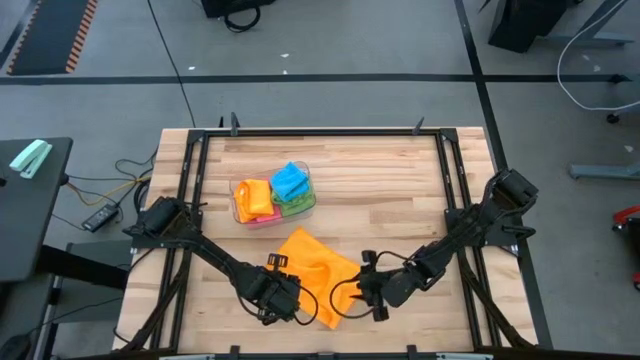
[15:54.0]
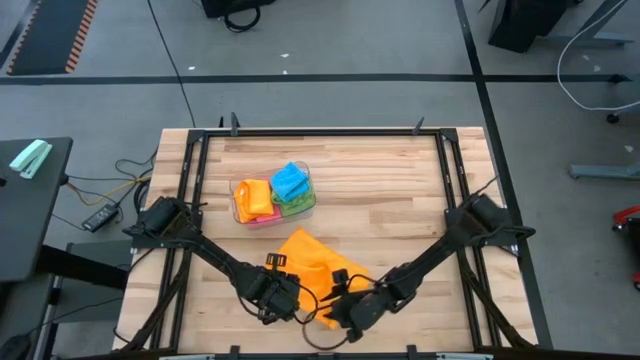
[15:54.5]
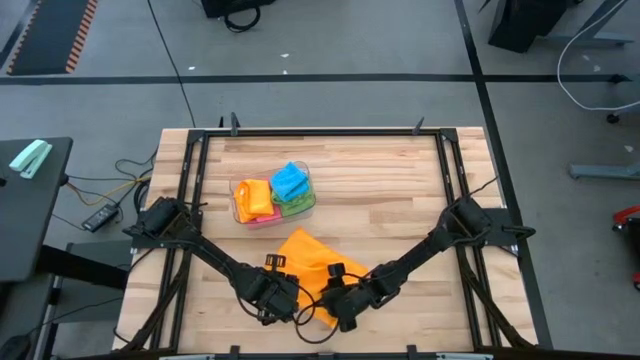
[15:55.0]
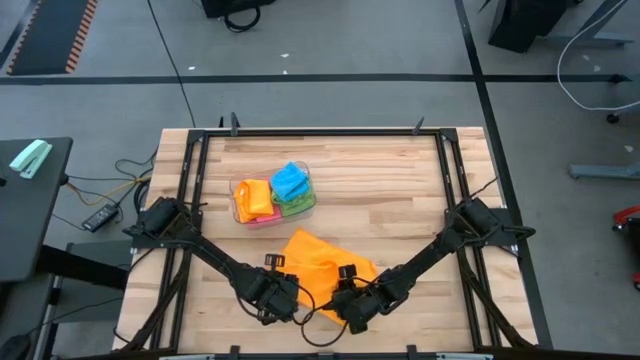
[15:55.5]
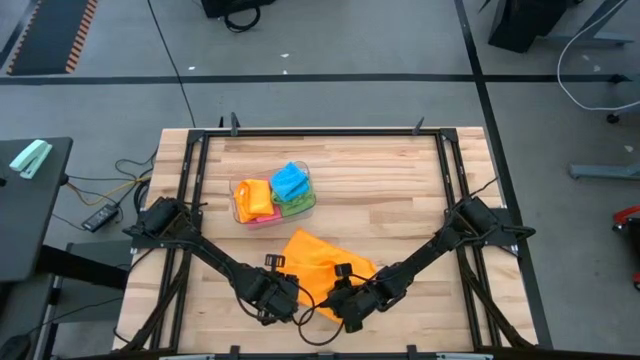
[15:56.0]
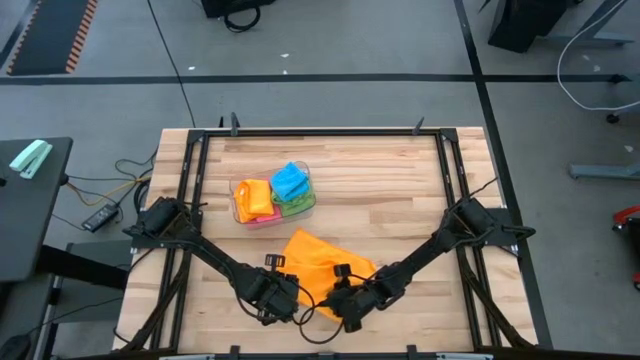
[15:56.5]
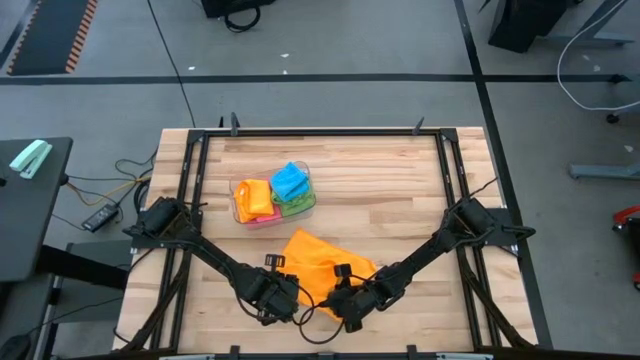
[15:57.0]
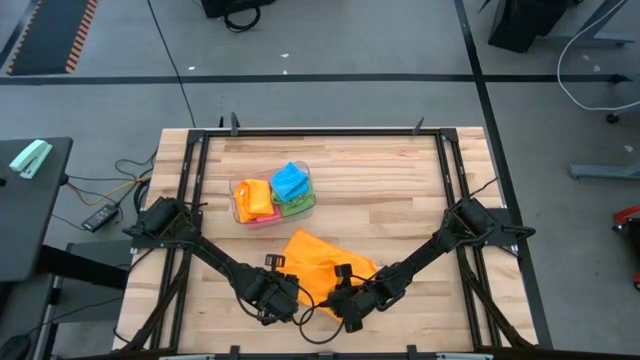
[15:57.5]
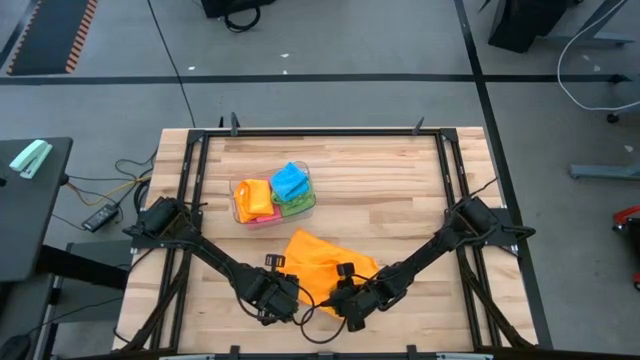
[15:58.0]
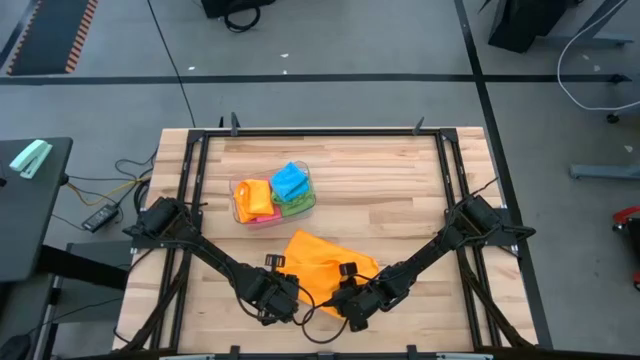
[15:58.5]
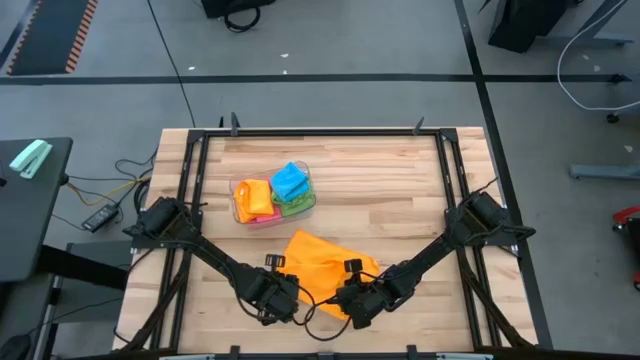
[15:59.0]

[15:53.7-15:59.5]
Task: Fold microfiber towels
Fold the yellow microfiber towel

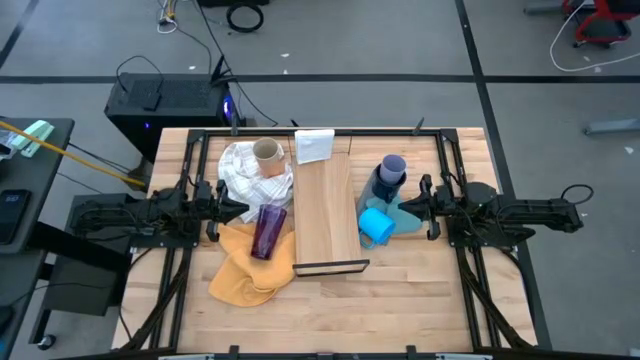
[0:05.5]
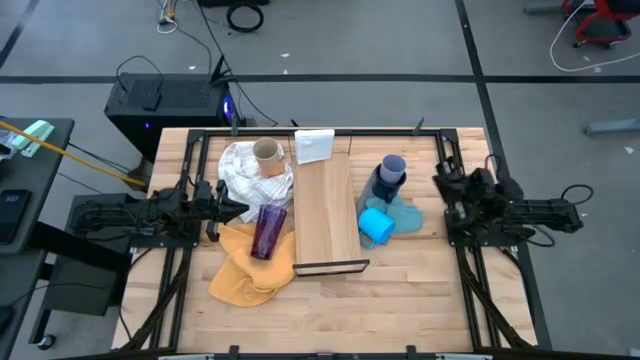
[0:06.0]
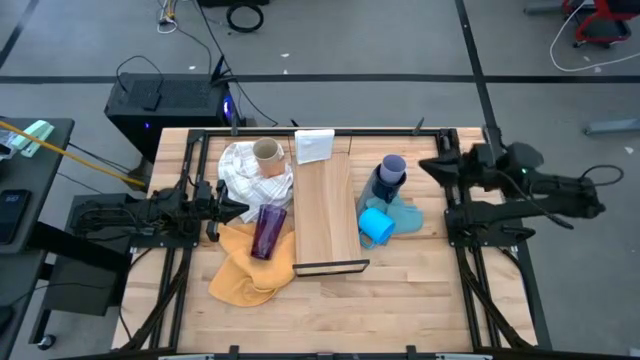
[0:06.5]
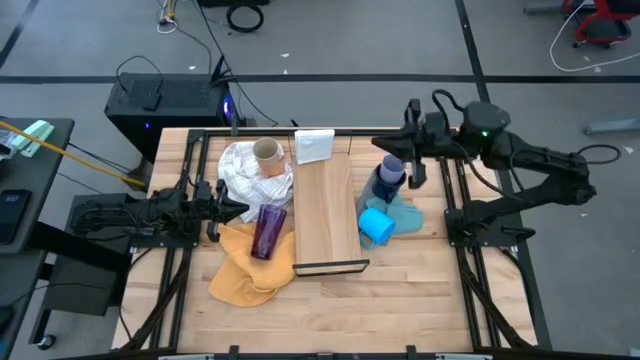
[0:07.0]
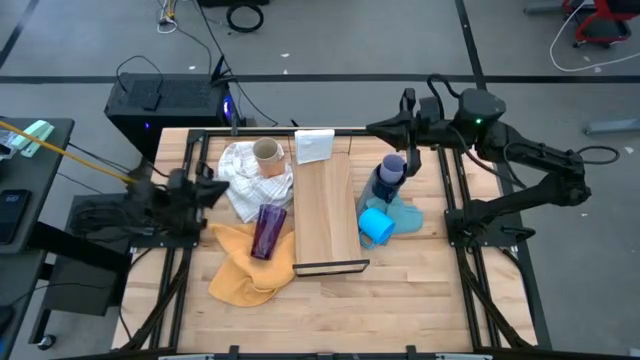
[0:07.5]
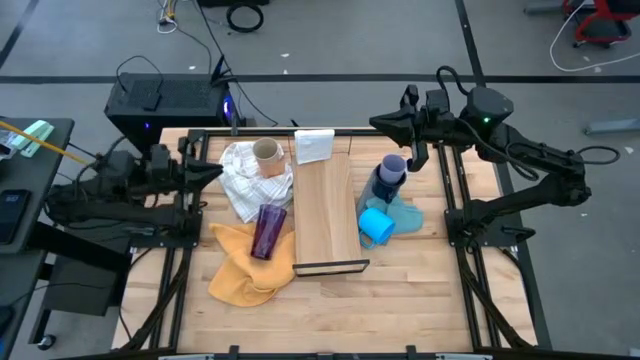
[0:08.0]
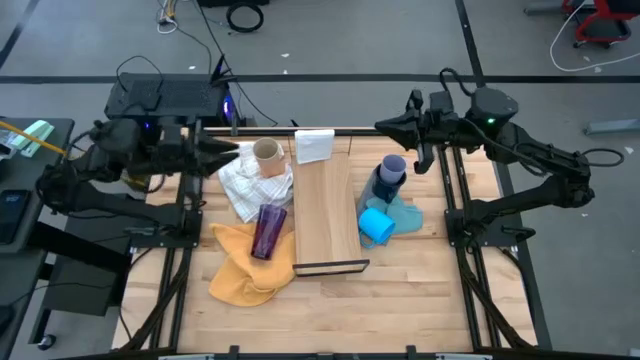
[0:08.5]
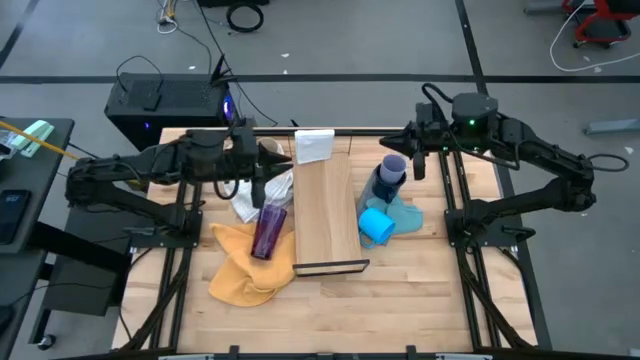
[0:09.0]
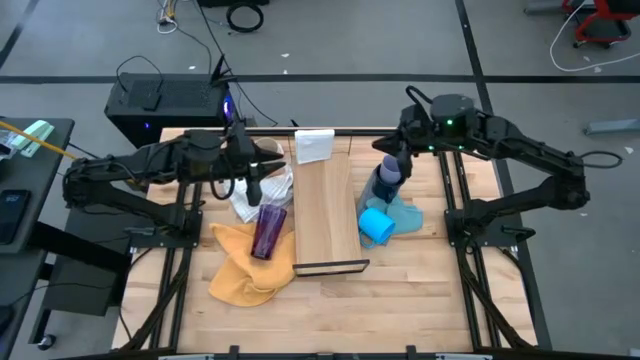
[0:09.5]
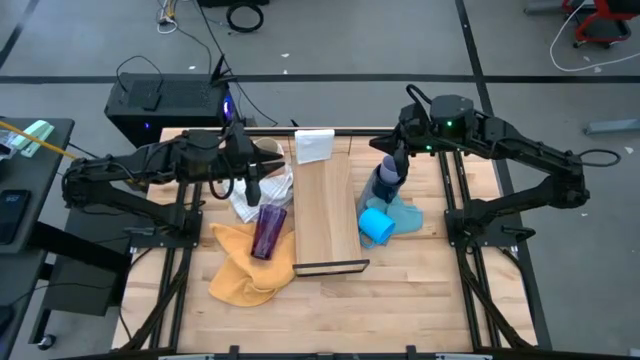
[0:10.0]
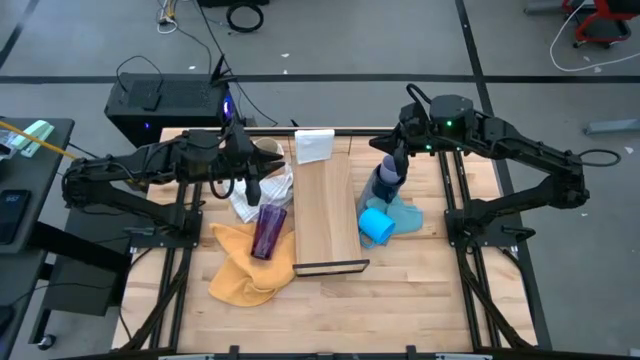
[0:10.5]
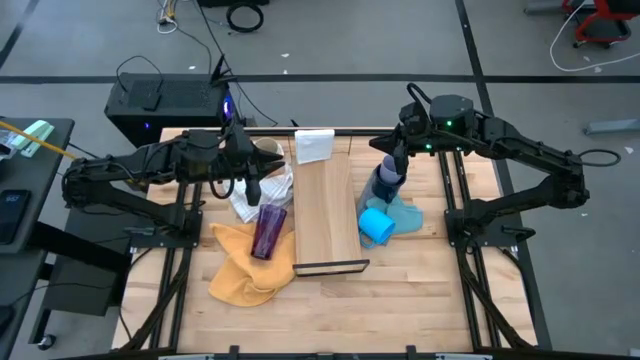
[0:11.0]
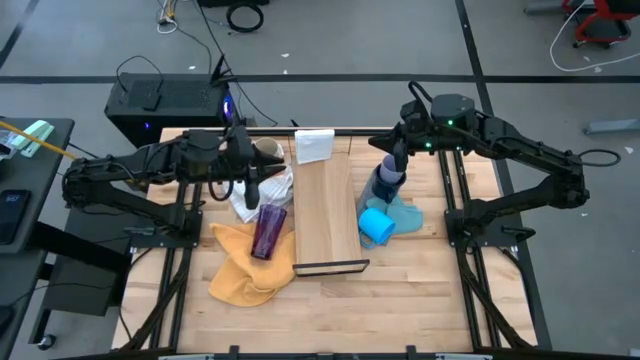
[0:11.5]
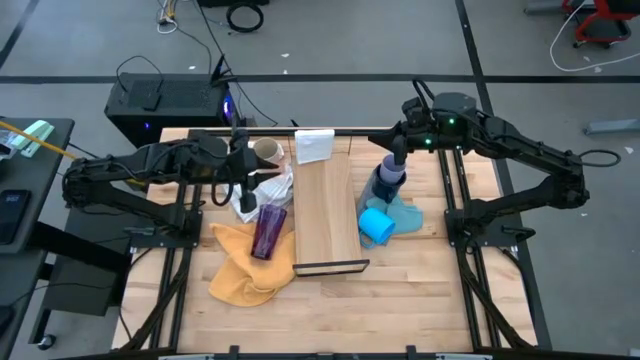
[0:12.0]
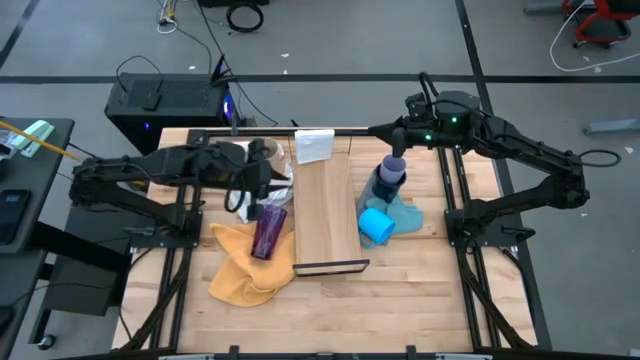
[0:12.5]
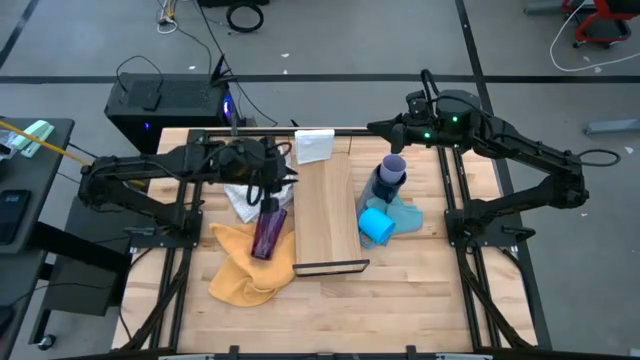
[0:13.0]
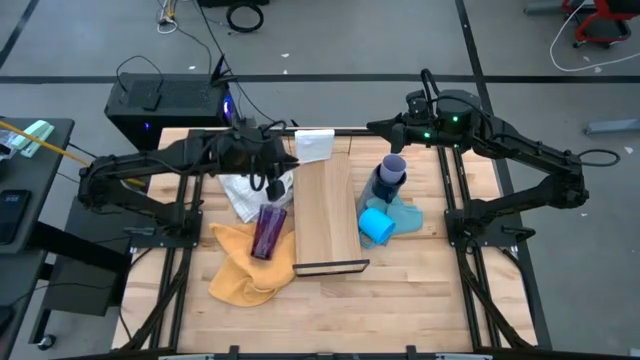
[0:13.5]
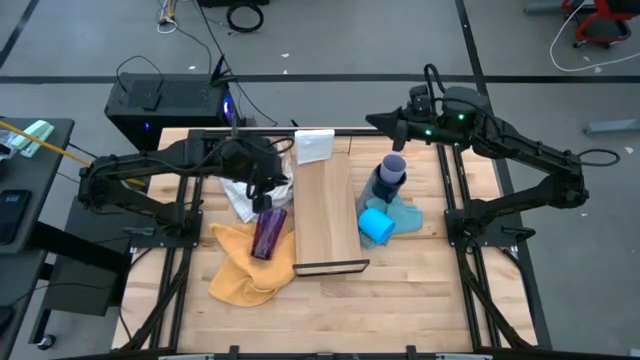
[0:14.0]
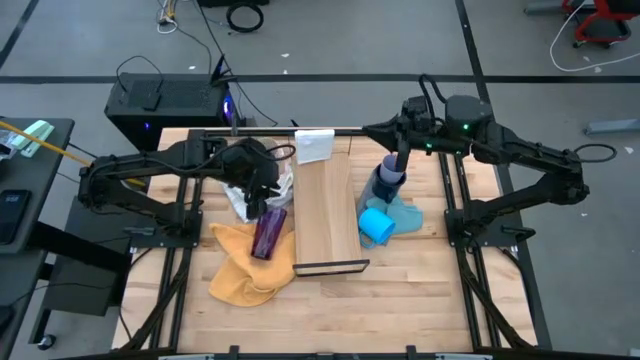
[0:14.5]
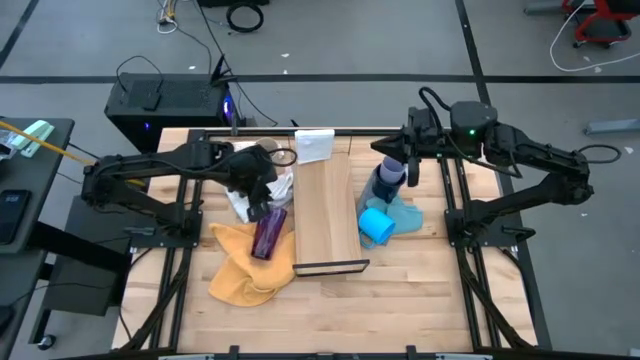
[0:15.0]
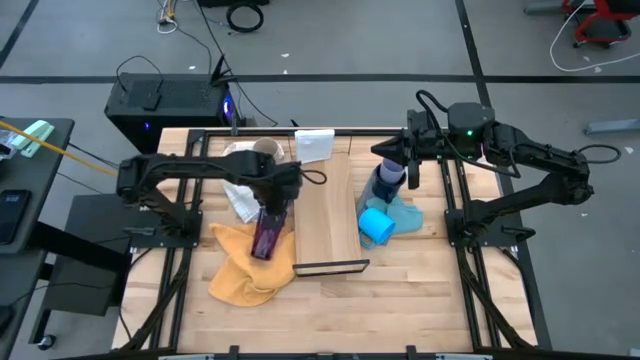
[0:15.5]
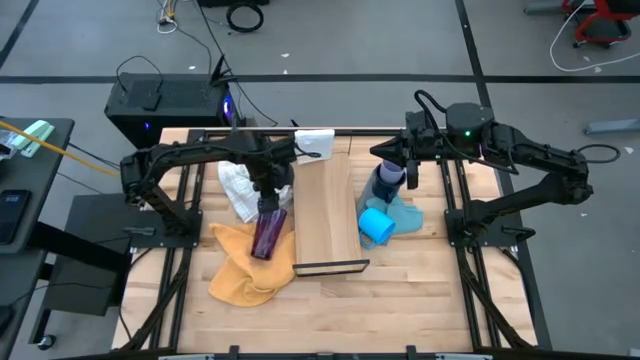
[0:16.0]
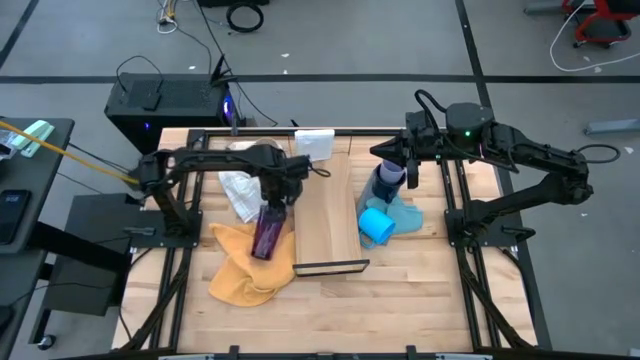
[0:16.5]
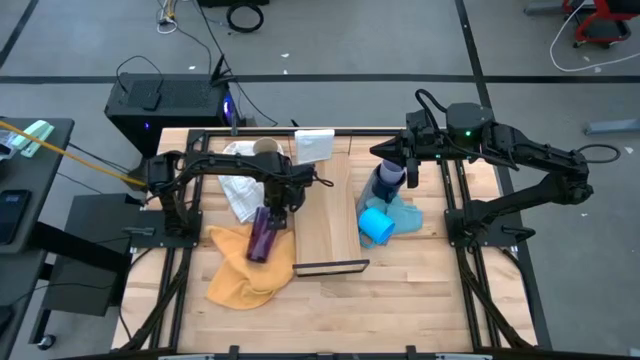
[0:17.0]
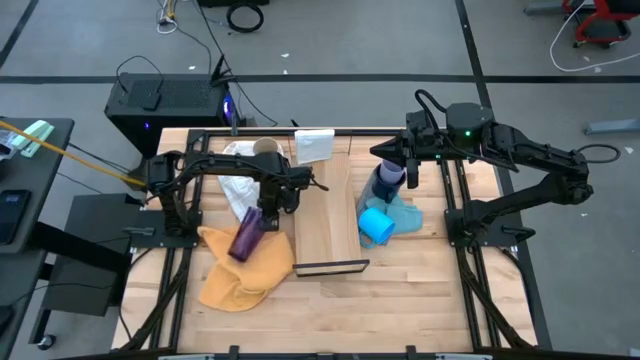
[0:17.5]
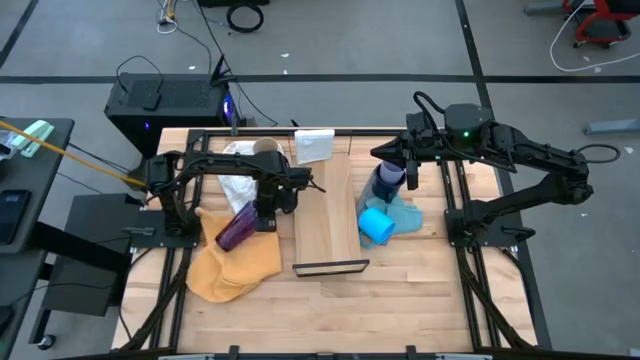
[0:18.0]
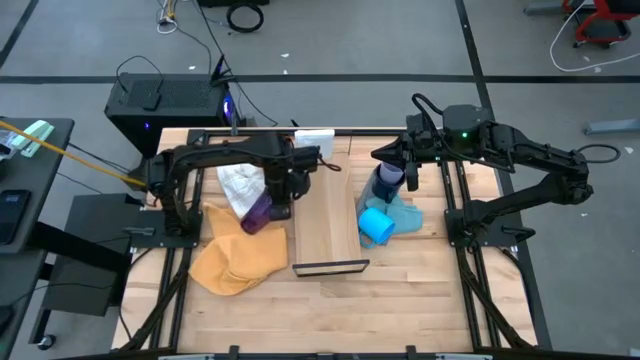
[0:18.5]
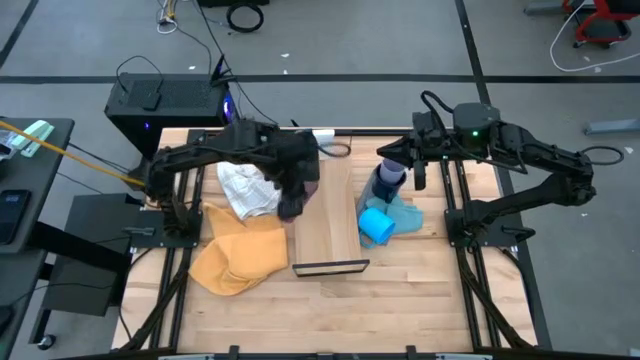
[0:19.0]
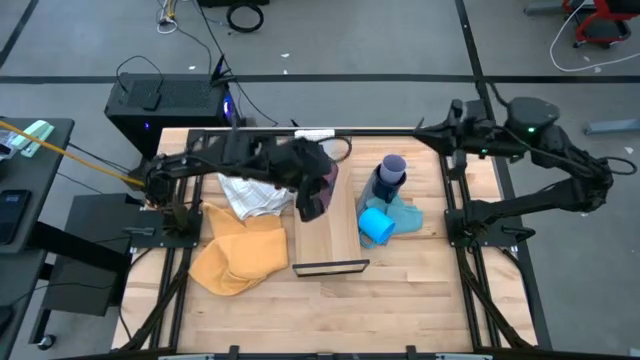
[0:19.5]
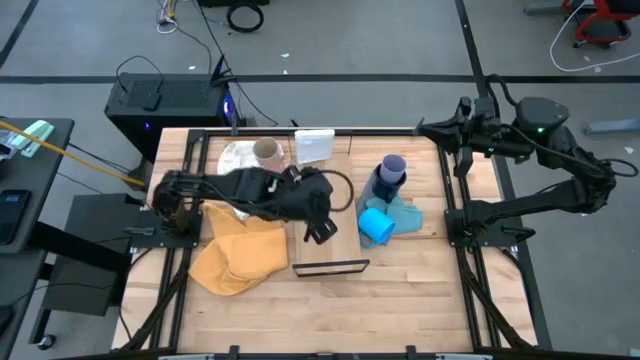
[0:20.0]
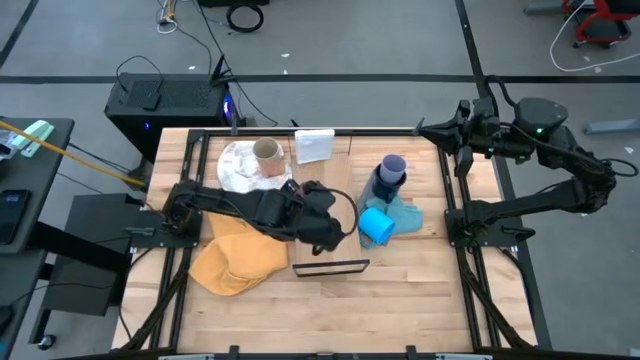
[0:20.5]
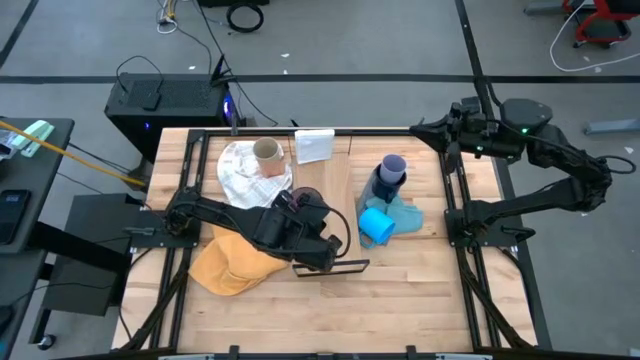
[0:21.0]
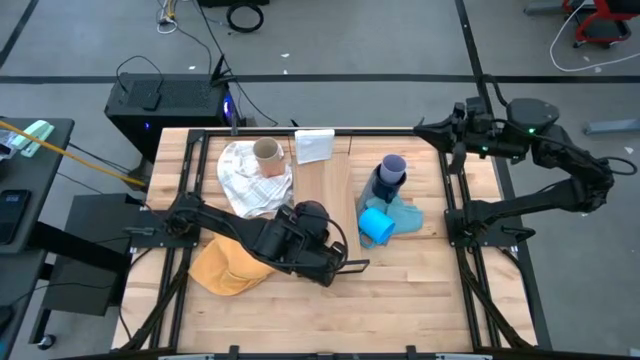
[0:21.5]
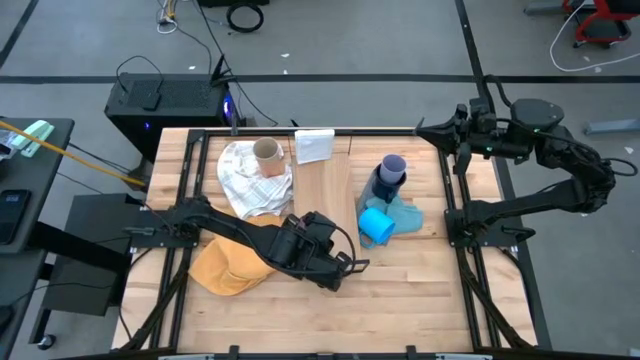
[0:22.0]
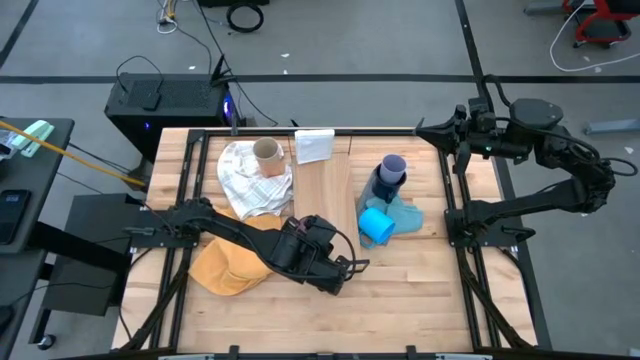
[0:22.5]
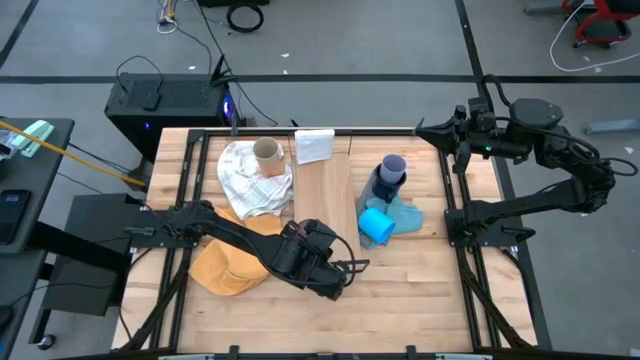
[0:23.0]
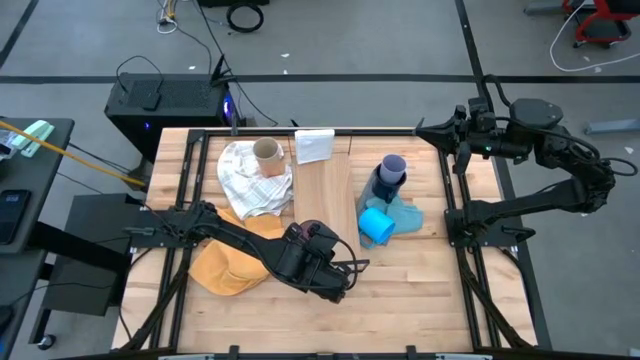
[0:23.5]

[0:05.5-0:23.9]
Task: Stack small to large cups/mugs on shelf
Put the violet cup on the shelf
